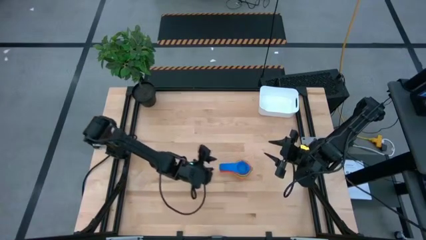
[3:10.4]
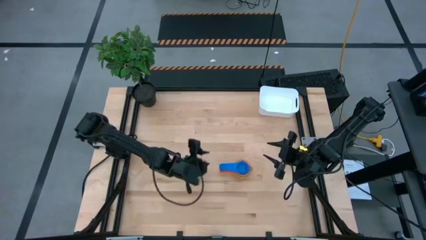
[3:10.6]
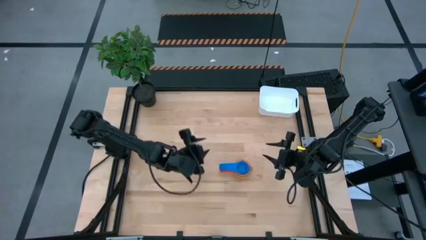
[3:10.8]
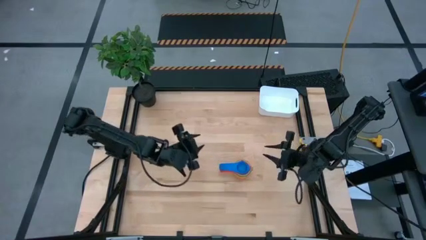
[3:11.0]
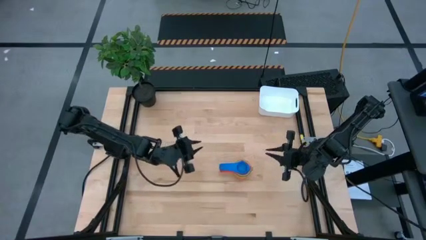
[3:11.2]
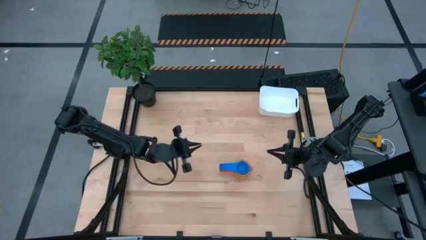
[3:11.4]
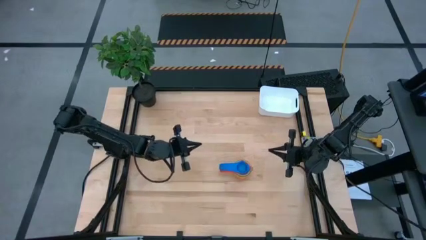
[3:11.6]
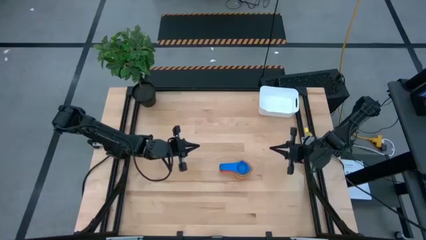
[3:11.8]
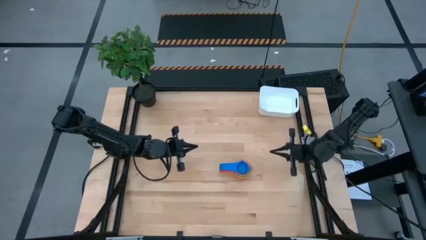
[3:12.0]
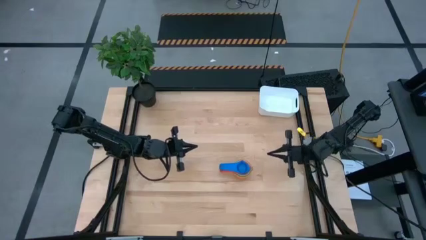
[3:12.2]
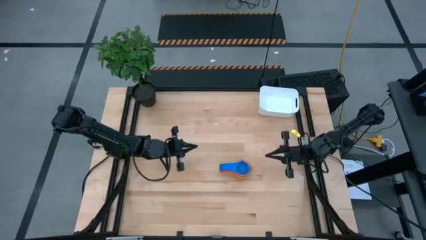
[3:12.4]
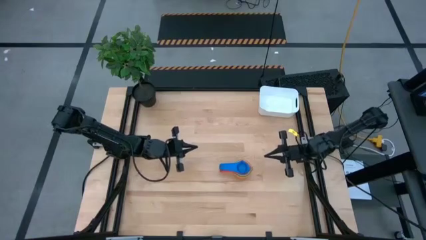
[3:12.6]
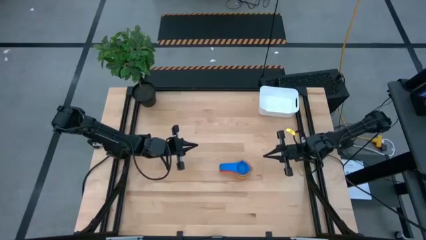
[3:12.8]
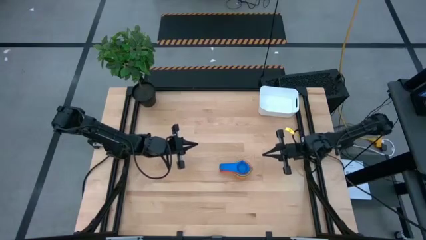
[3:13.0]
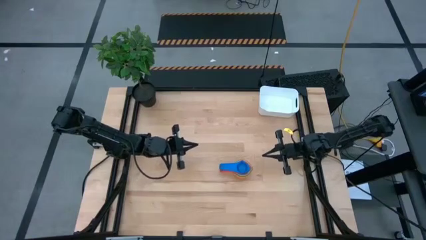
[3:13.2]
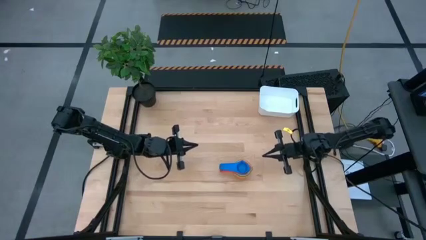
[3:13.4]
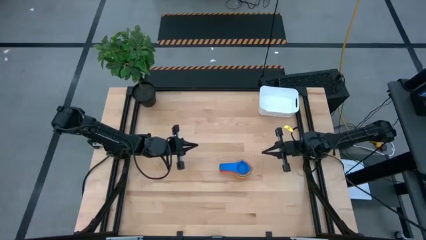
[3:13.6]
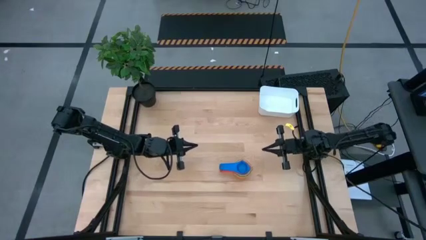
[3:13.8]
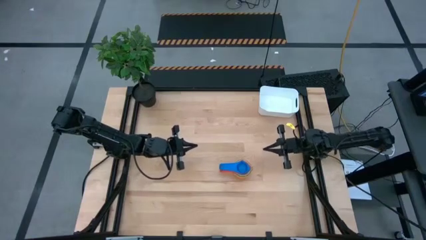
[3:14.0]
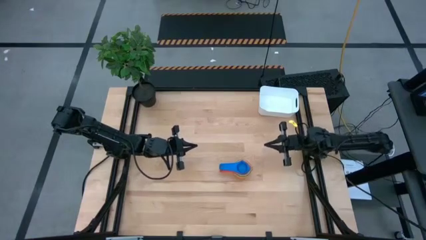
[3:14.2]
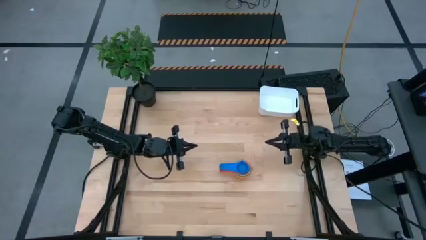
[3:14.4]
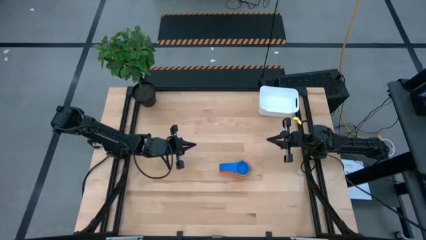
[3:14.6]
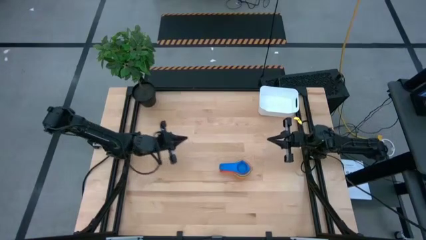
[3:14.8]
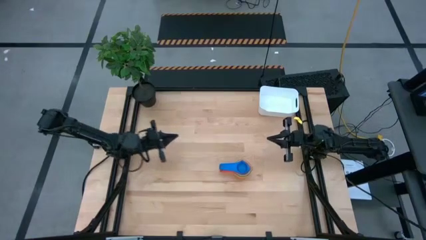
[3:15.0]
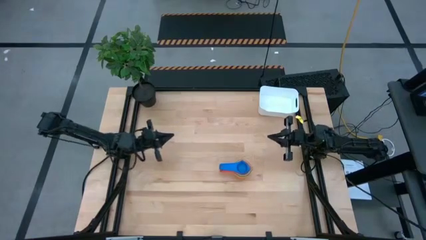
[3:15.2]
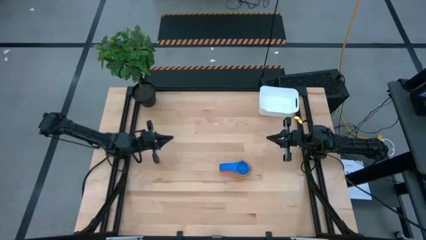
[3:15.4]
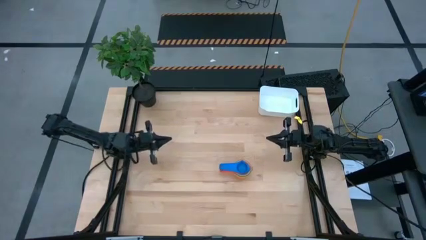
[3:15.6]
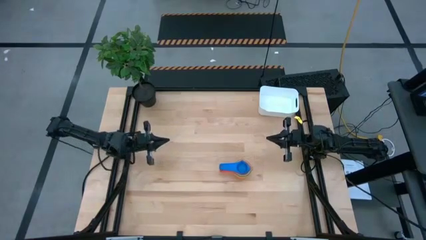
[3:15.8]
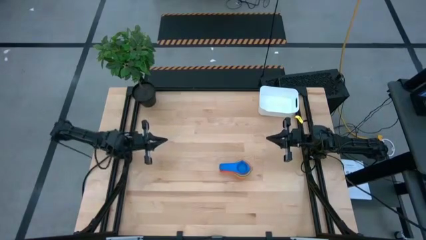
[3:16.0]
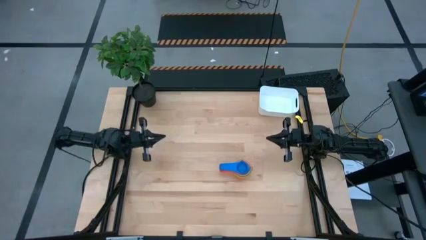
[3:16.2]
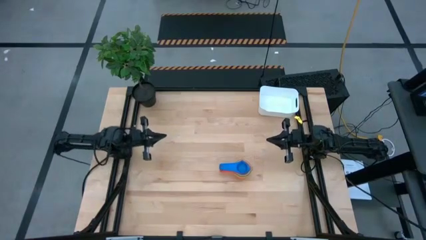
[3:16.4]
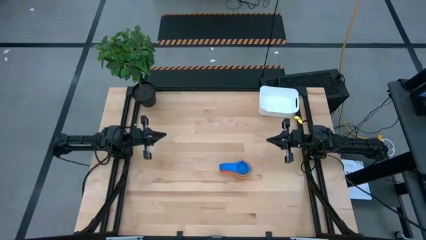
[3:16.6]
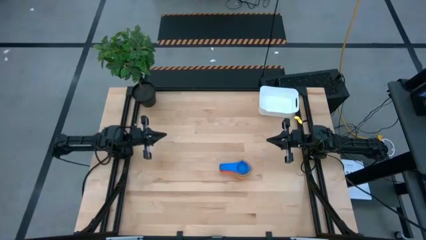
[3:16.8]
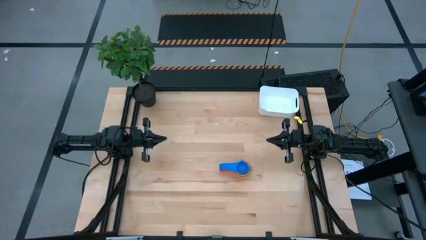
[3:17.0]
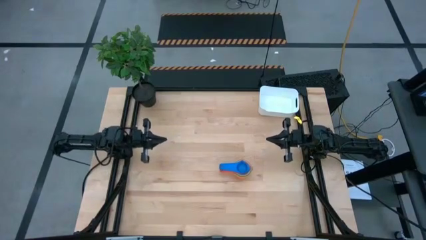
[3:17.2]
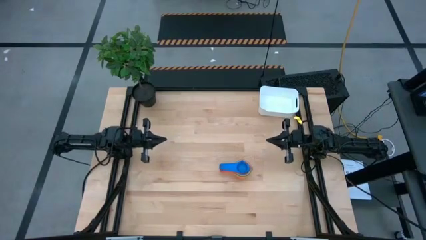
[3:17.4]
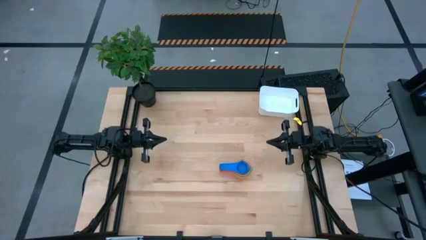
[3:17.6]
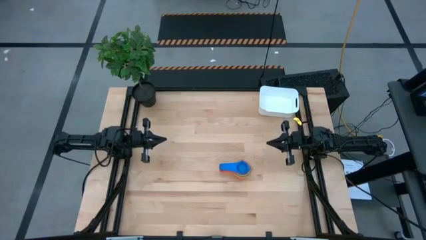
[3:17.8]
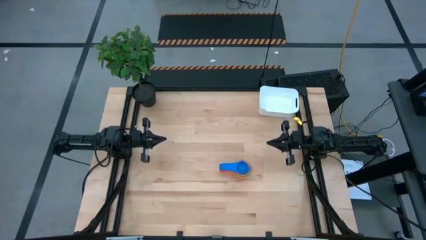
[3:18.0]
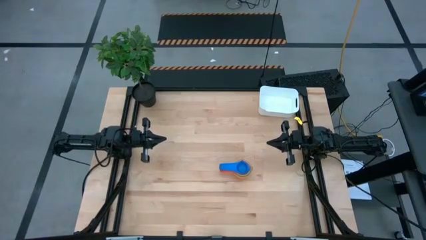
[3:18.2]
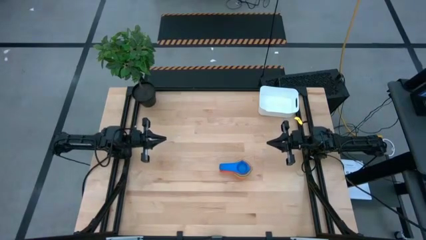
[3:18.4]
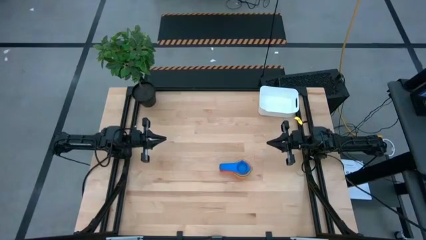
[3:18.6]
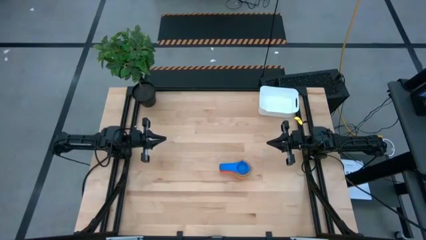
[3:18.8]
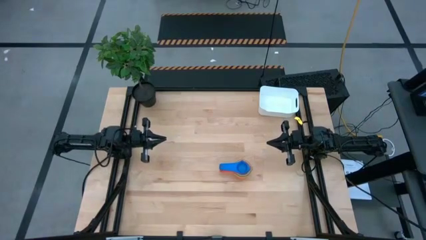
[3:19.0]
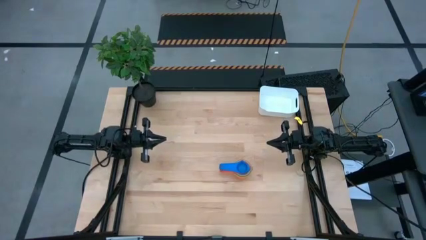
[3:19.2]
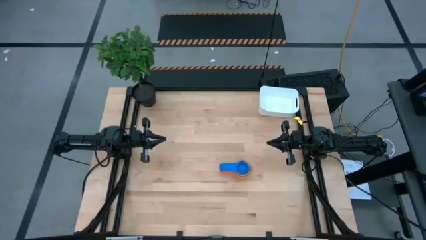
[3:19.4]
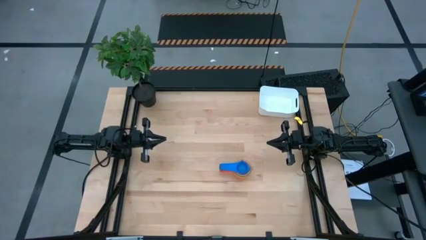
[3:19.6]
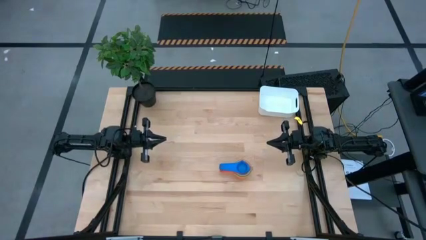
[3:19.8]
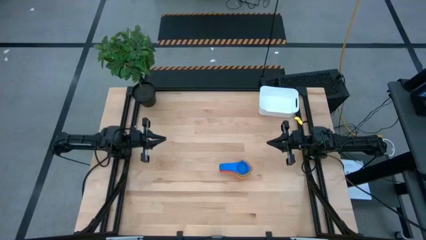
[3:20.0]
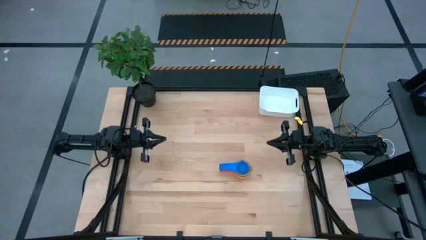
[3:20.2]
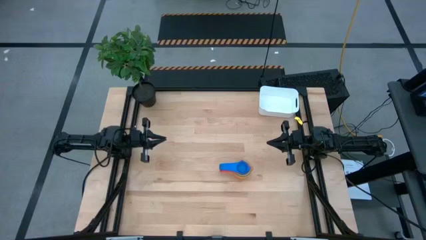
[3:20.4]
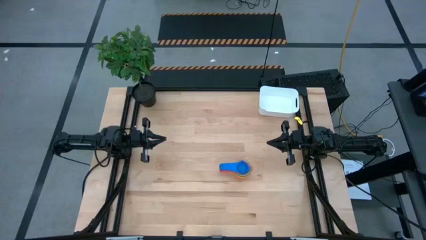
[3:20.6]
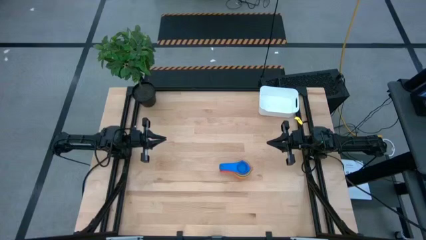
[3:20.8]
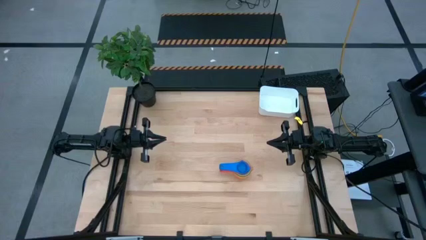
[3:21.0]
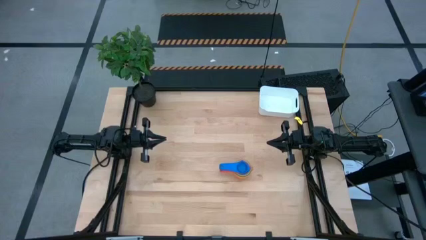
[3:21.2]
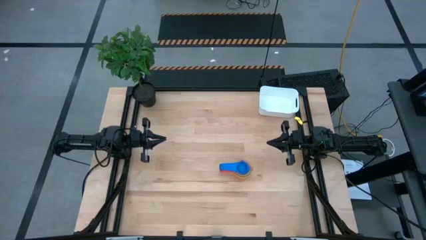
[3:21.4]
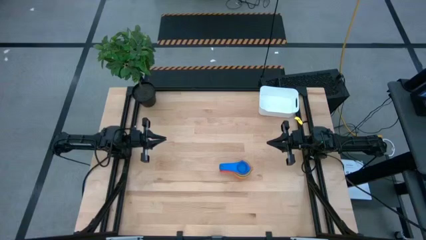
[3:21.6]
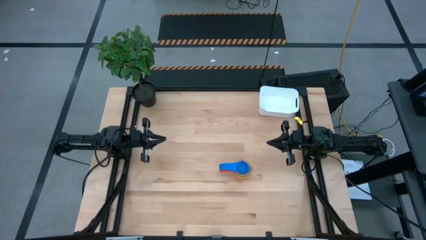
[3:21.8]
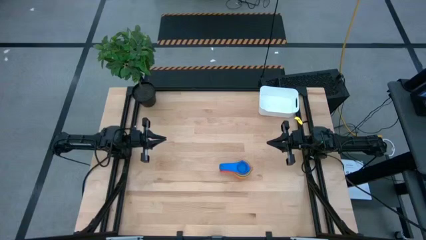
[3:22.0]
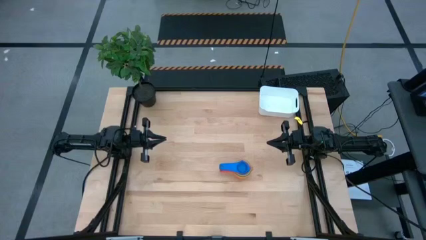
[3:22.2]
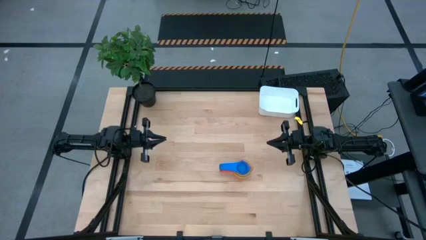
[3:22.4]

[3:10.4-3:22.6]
Task: Nest measuring cups in basket
Return to Home Position

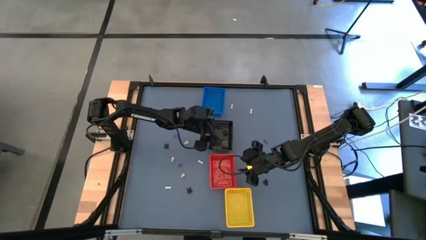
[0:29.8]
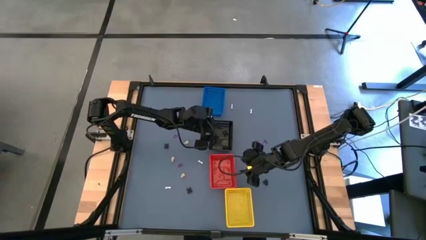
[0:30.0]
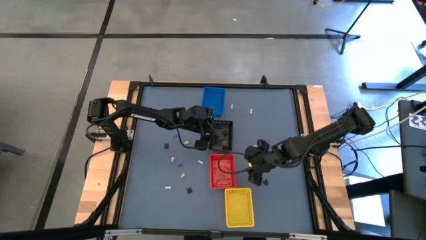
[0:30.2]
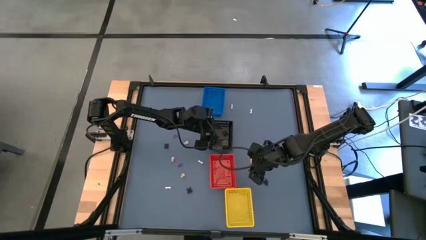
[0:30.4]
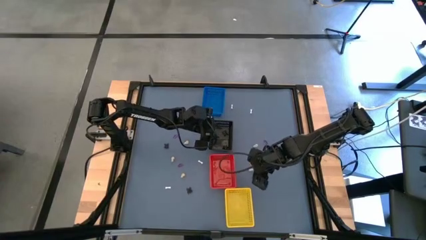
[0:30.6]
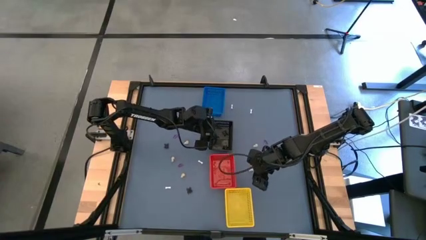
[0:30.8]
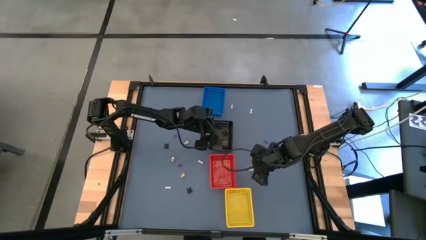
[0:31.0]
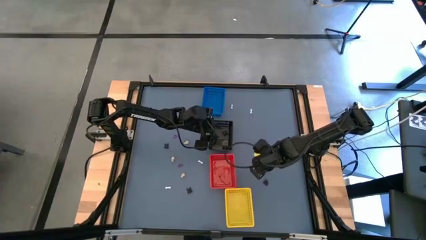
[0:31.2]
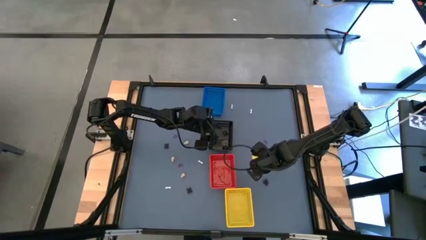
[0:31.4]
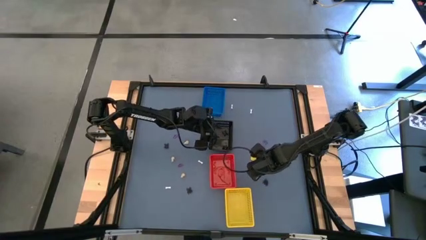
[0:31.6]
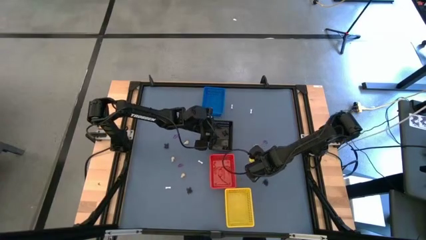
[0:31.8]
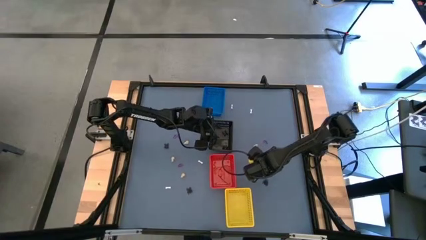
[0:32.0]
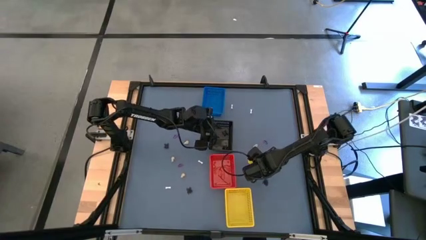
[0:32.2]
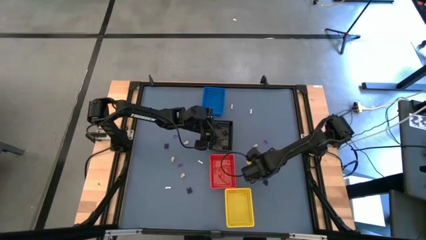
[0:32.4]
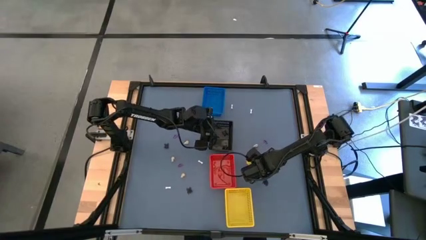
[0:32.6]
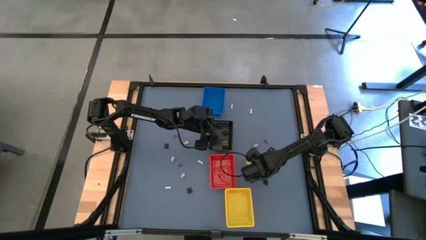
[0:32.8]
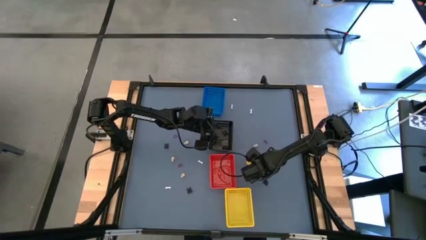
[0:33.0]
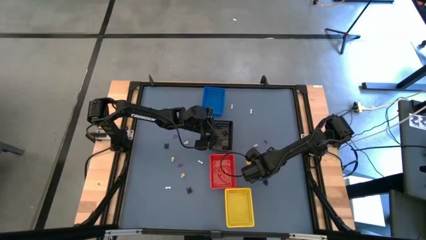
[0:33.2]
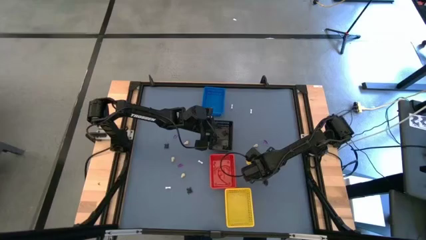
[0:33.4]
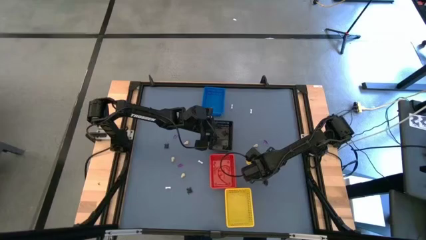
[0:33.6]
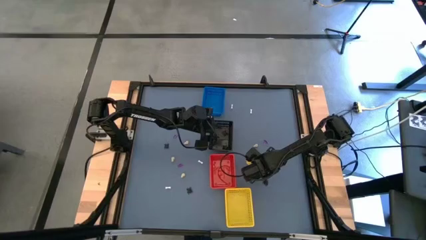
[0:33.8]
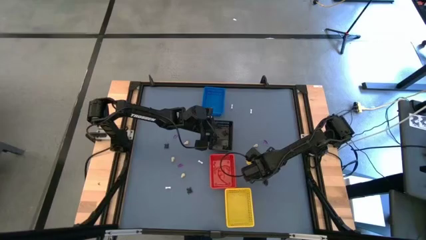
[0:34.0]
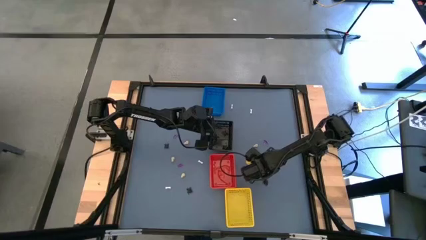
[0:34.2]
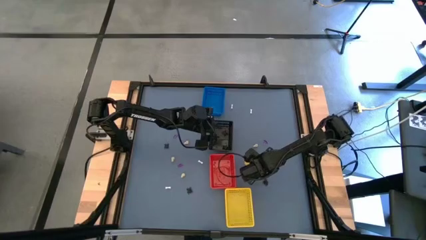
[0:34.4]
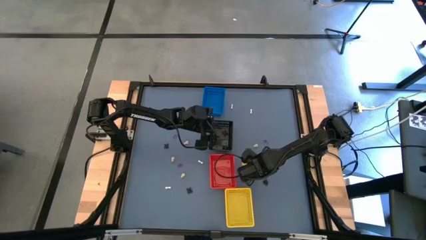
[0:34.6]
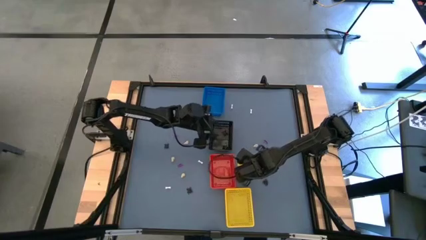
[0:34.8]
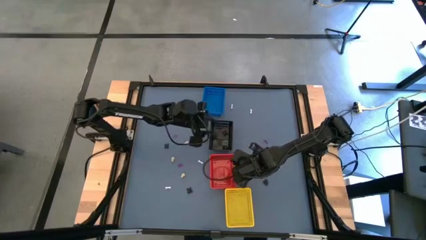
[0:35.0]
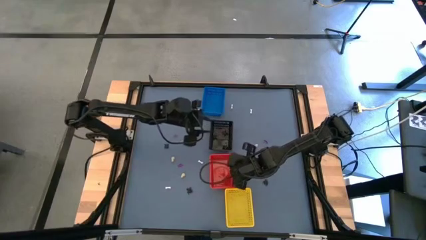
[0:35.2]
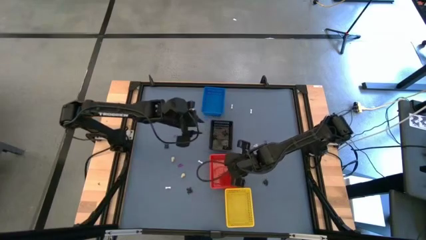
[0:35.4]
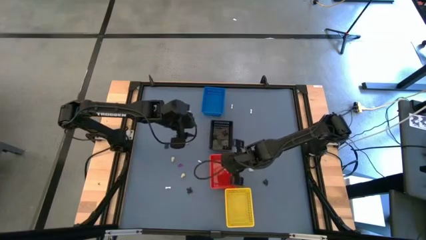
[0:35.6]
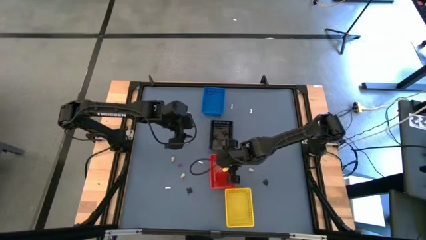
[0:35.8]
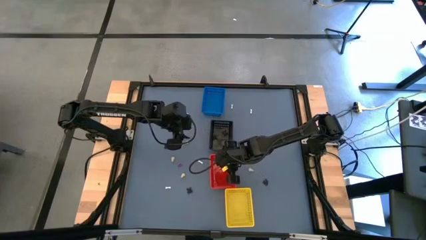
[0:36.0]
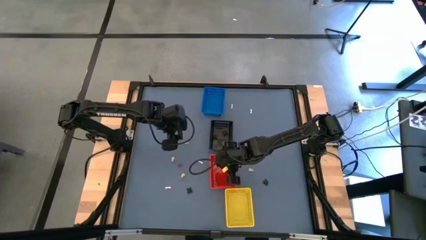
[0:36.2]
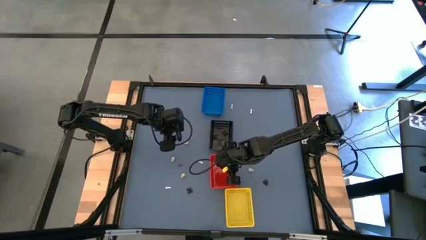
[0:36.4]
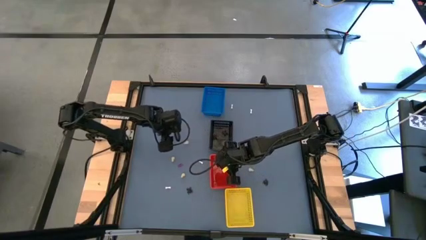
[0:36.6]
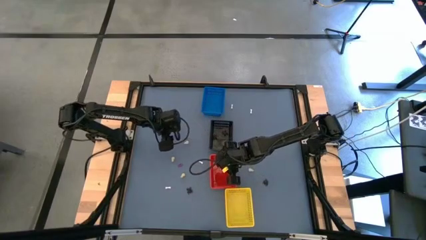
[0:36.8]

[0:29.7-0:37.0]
Task: Sort Halloween decoration
Put the violet witch hat toy into the red bin
